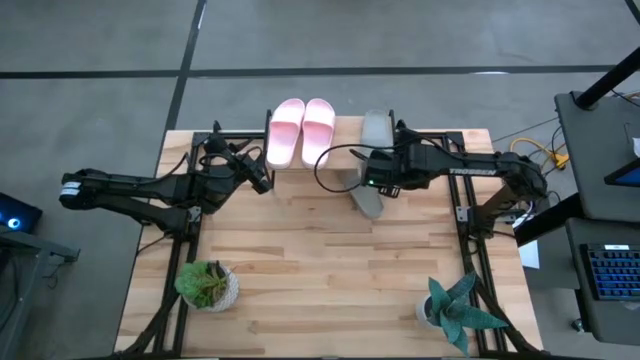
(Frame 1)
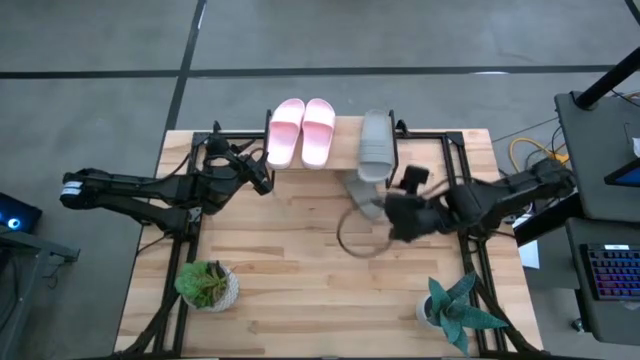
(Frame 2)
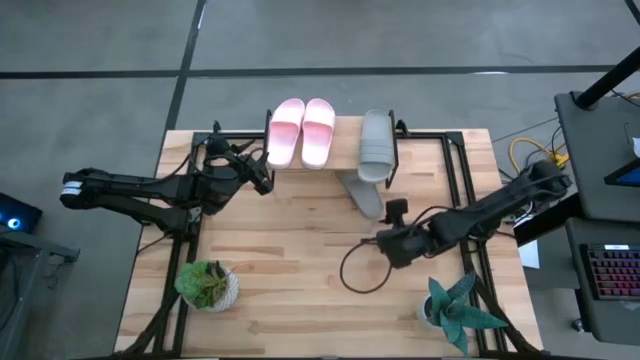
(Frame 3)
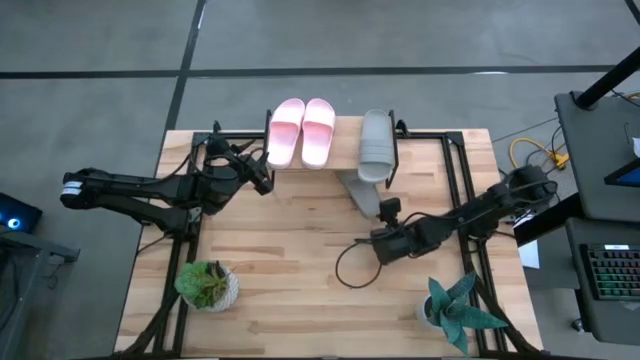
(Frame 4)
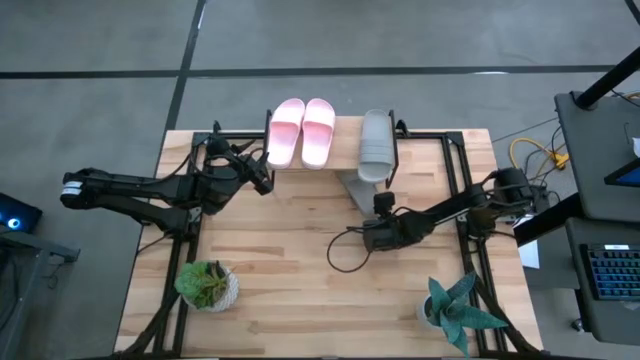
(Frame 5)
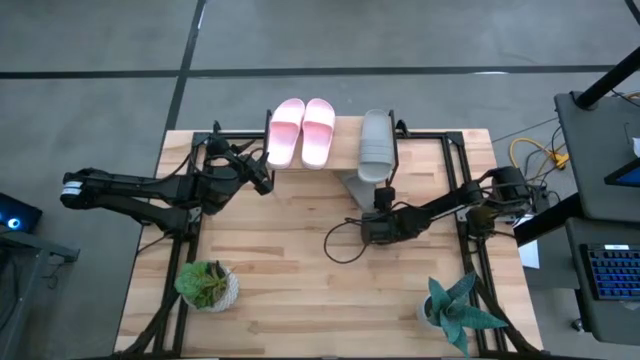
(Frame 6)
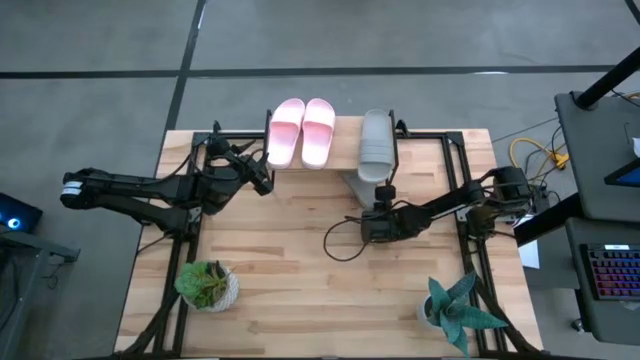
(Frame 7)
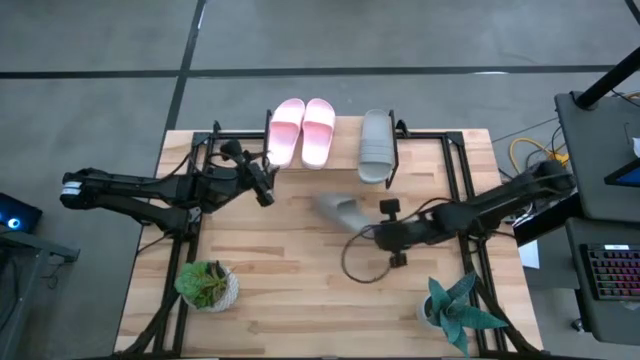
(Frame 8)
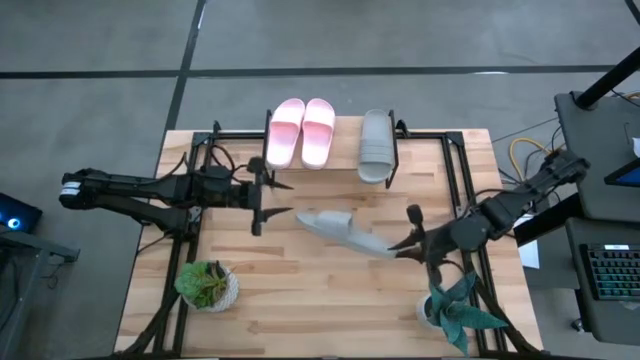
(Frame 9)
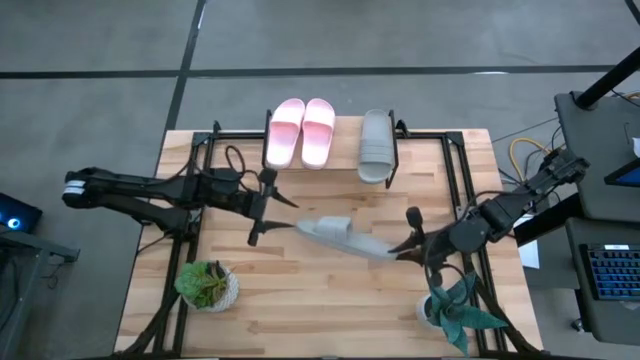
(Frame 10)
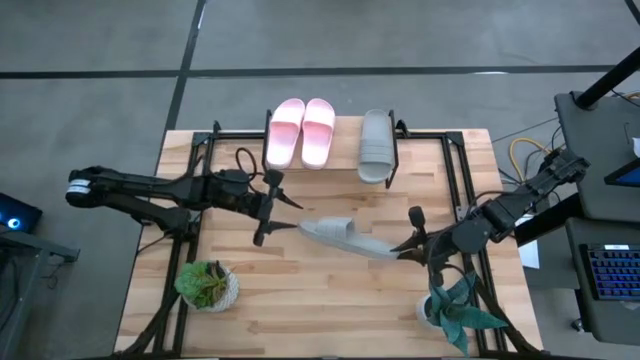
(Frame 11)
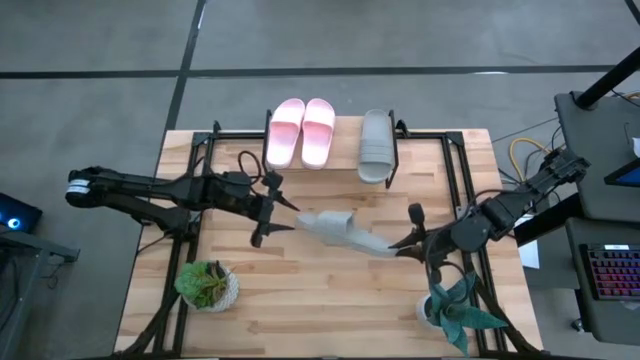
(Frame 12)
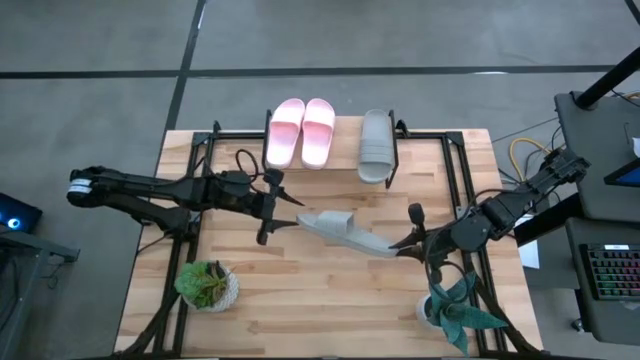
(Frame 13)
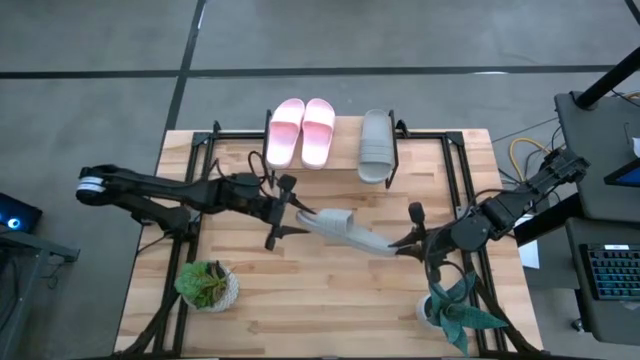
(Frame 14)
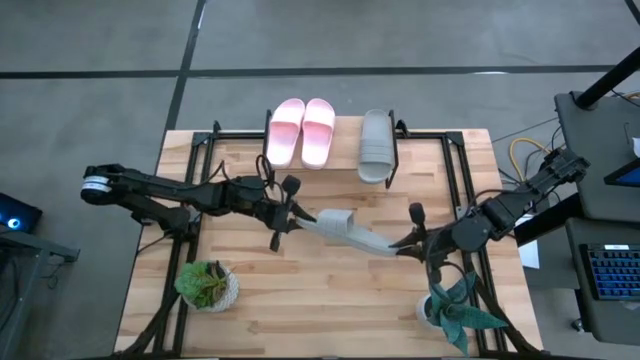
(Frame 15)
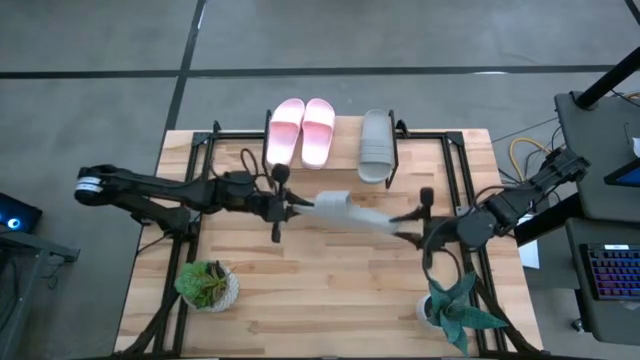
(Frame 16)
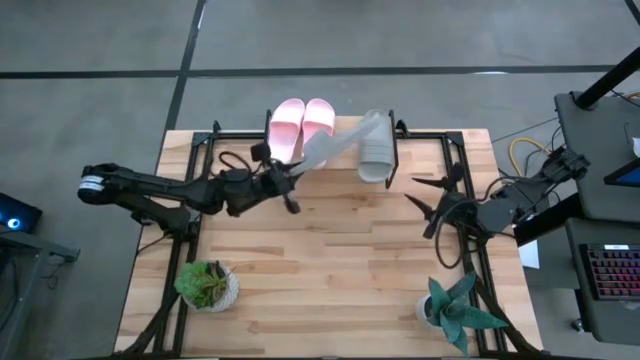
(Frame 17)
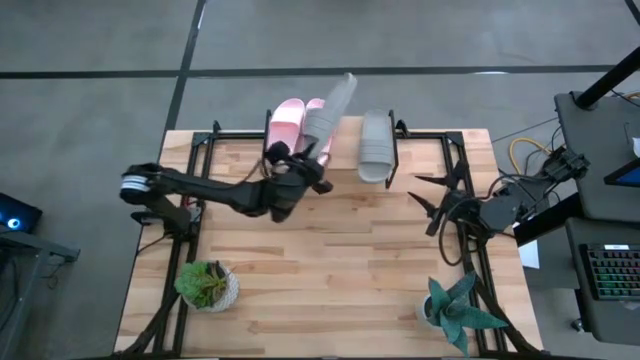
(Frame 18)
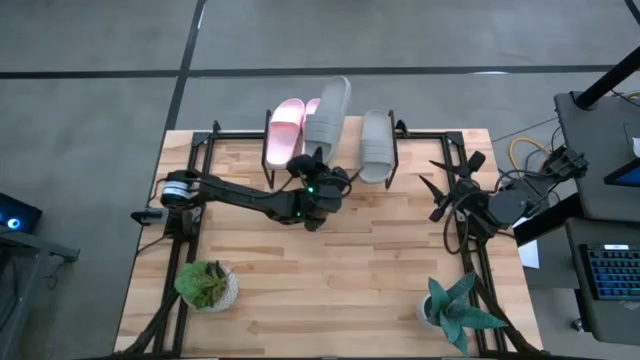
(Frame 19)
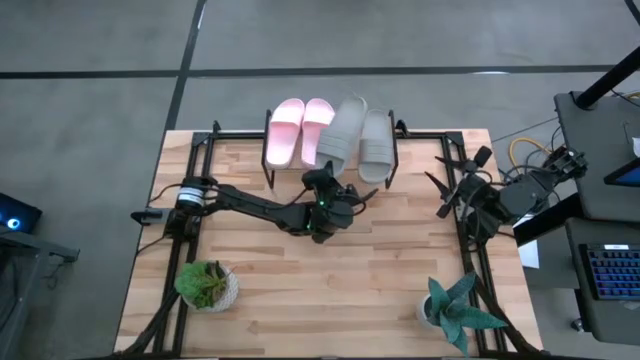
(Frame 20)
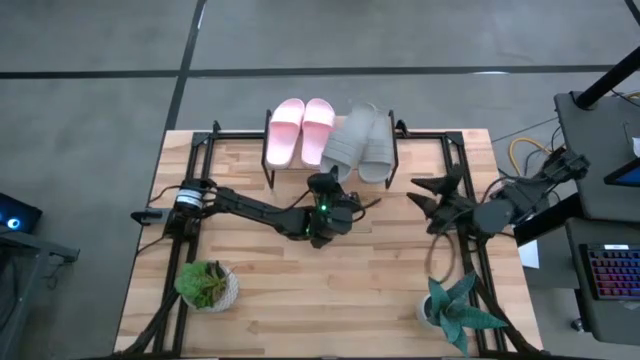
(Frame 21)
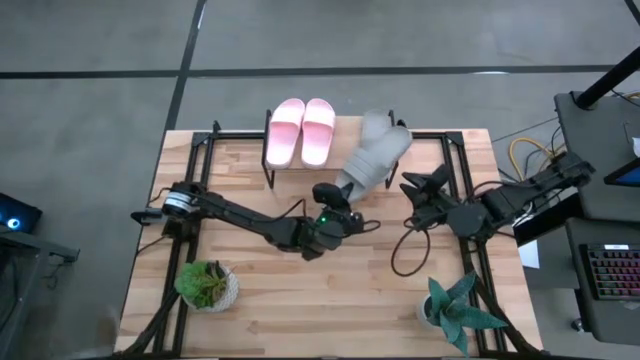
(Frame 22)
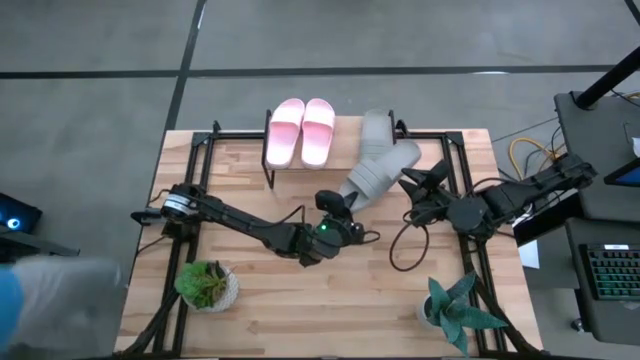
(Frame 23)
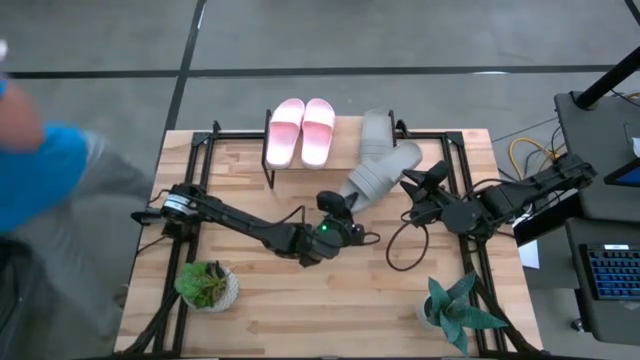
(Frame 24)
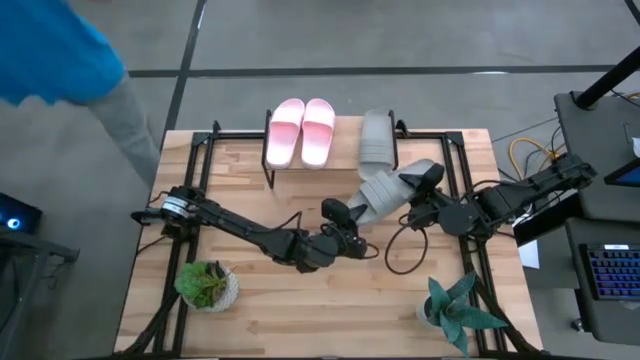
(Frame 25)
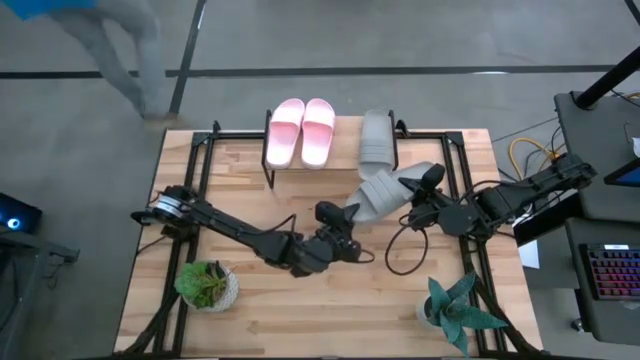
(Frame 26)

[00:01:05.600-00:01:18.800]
Task: Pick and place slides into the shelf
Put the gray slides on the shelf

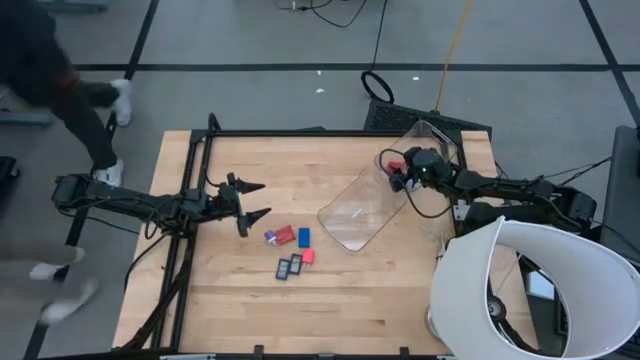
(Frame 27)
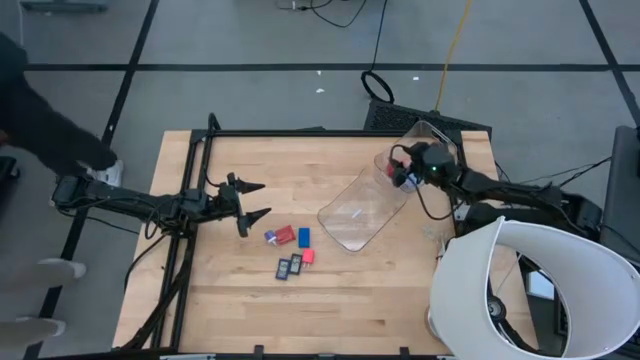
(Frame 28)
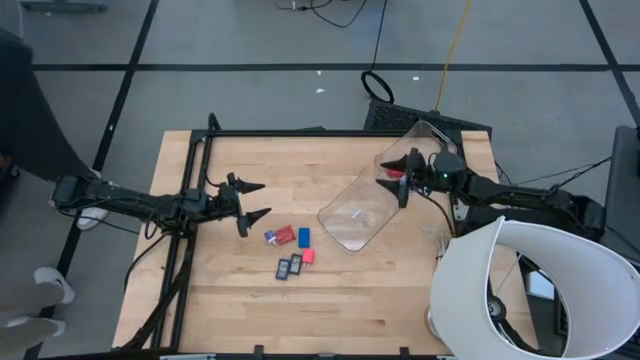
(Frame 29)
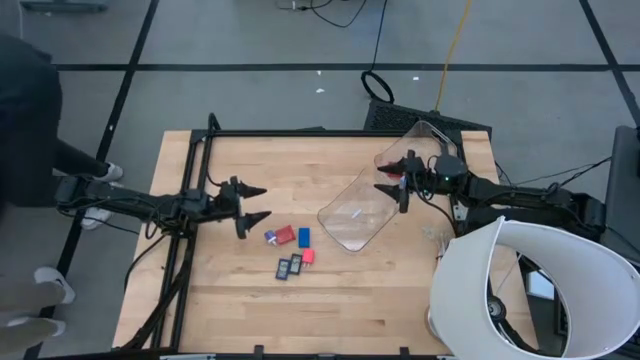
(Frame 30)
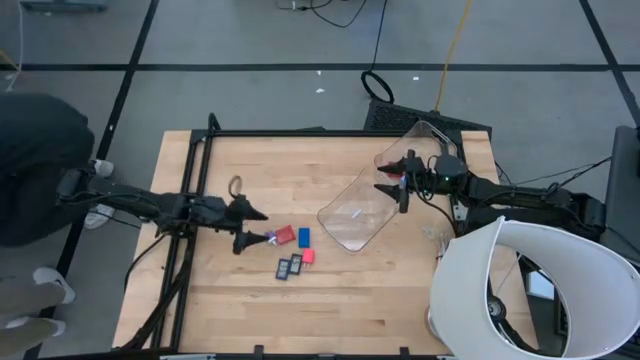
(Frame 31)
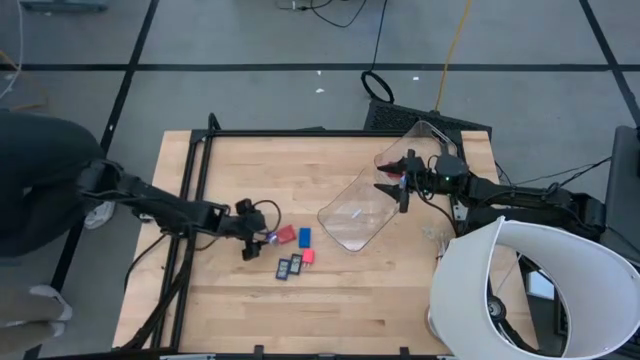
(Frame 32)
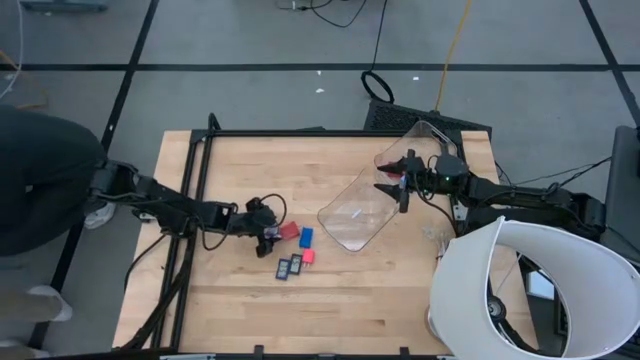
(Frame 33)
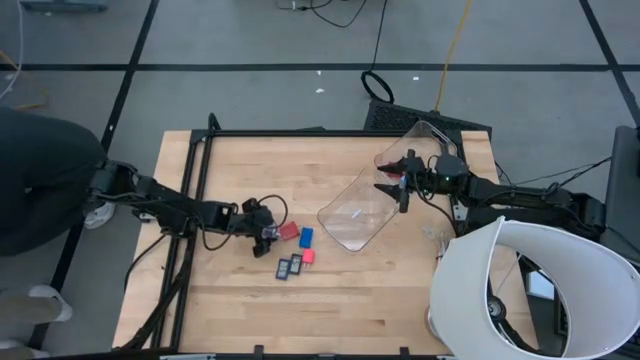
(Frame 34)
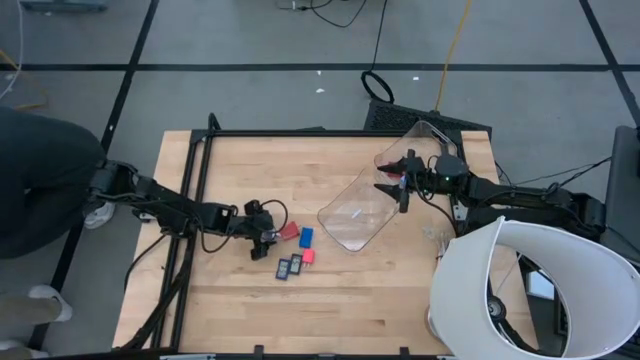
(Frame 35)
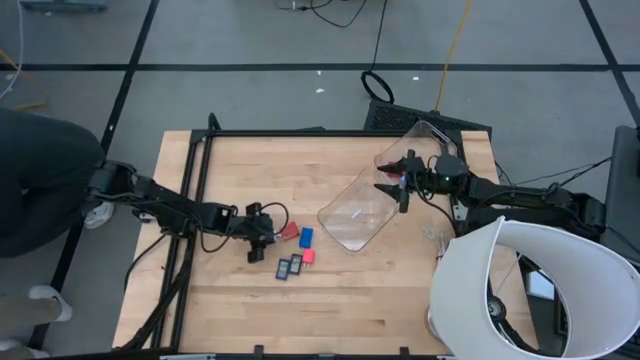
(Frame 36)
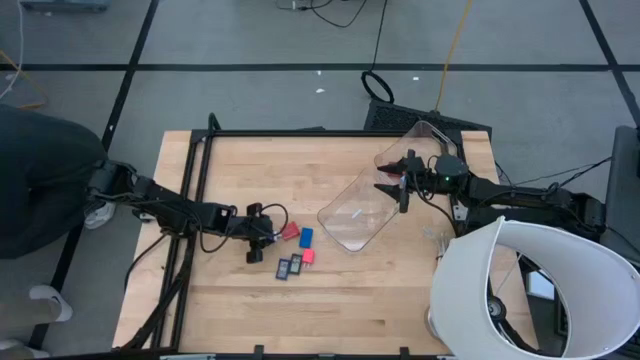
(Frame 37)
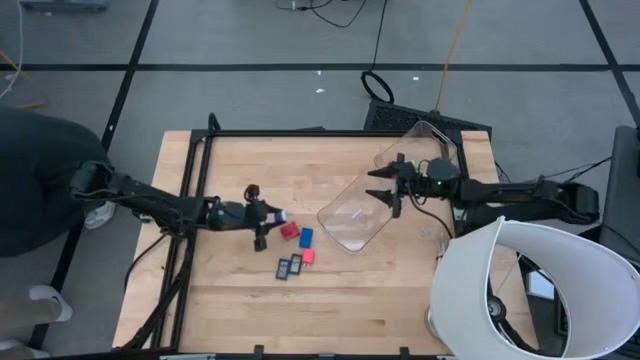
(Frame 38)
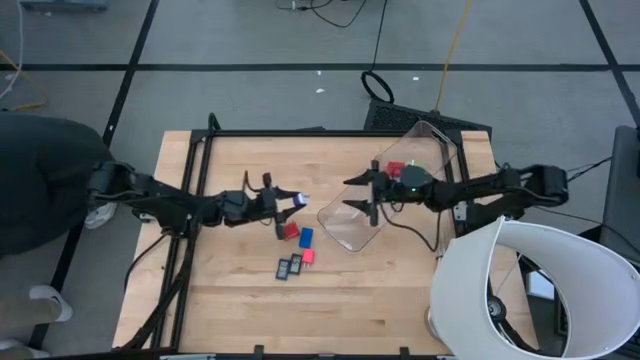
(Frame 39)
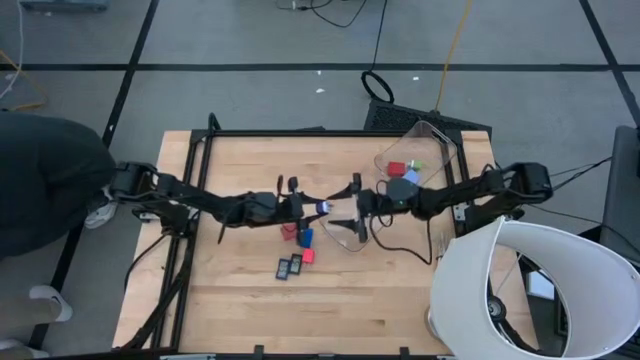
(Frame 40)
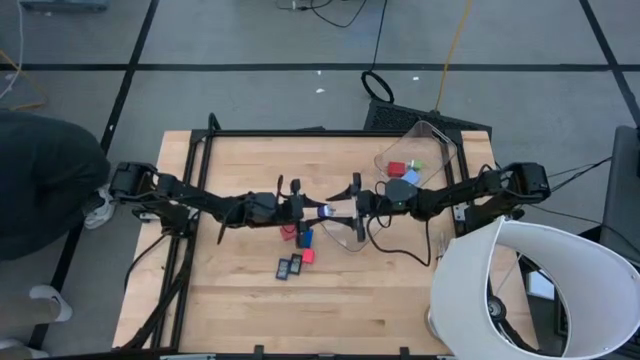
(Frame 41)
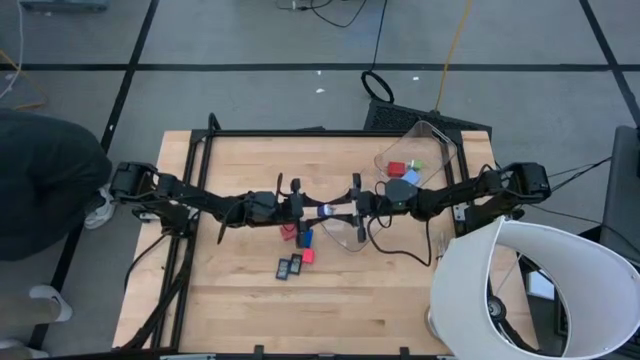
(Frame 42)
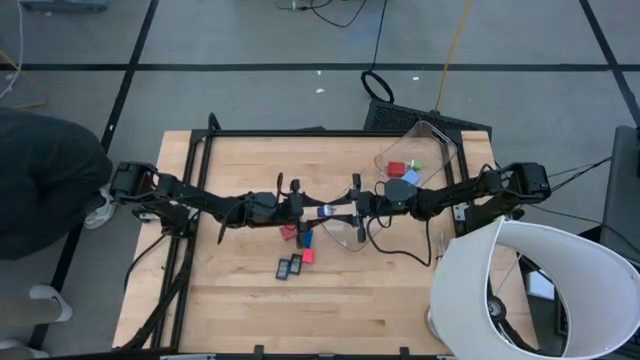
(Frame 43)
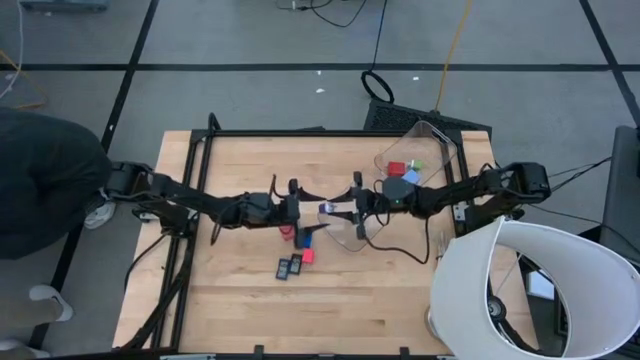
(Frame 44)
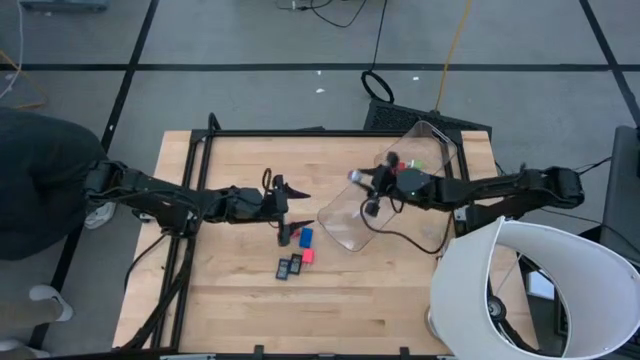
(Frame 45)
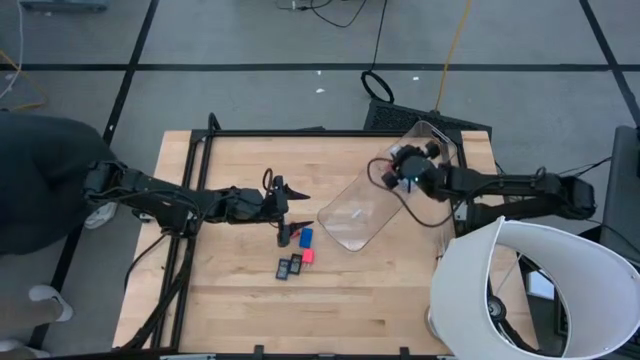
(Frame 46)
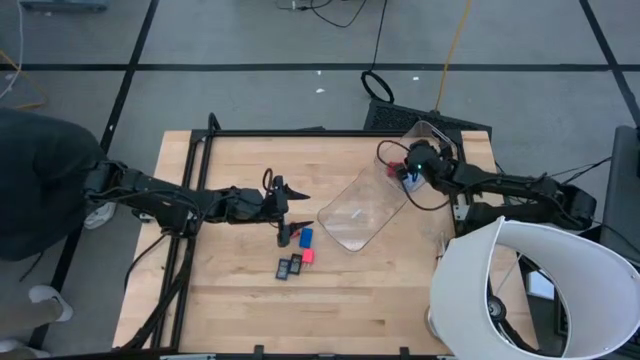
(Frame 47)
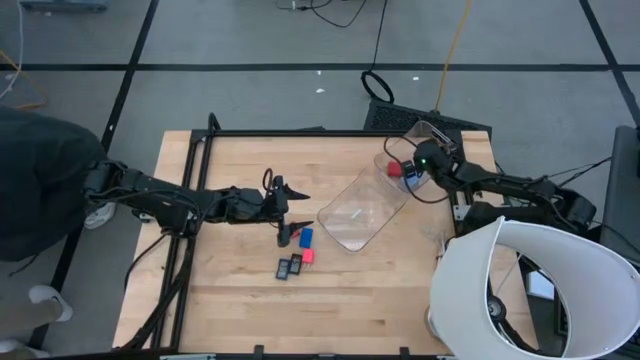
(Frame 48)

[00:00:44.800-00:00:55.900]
Task: Pick & Place Office items
Put the purple charger adapter into the right transparent bin
